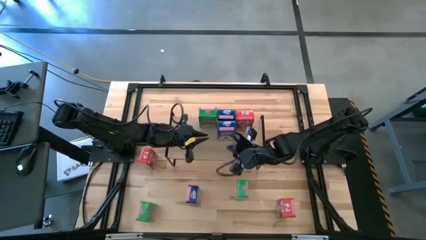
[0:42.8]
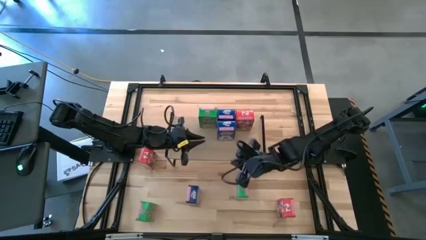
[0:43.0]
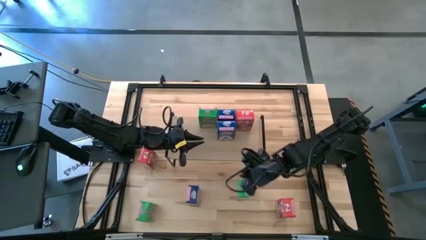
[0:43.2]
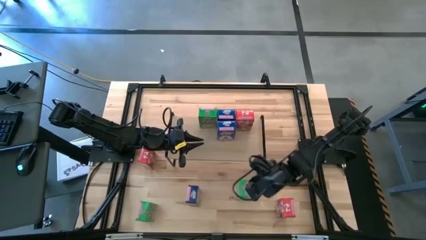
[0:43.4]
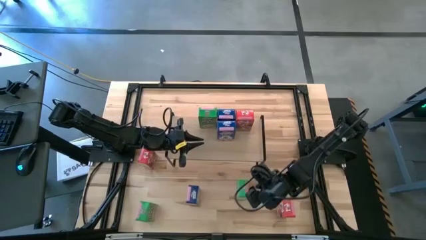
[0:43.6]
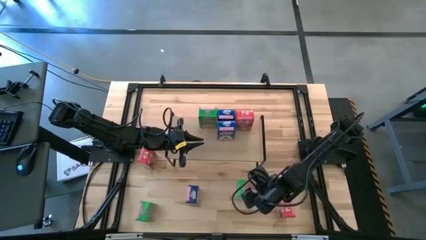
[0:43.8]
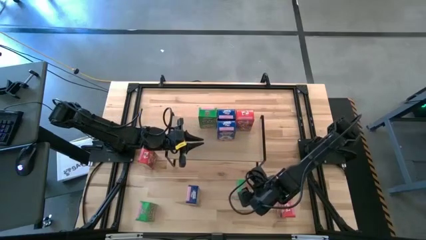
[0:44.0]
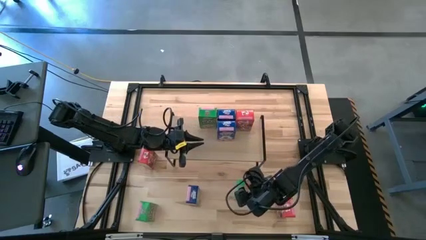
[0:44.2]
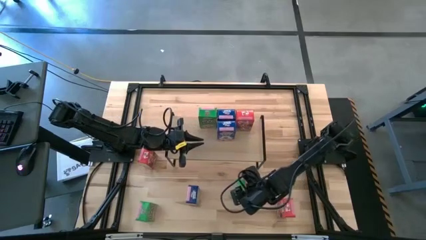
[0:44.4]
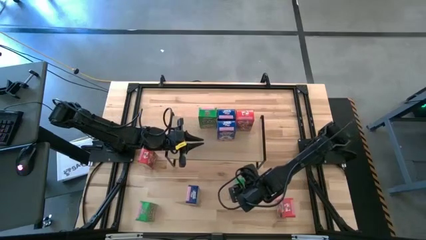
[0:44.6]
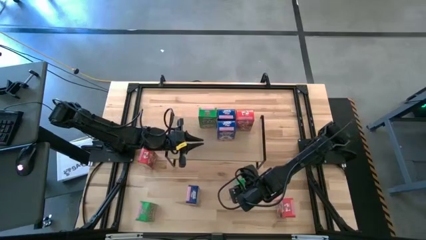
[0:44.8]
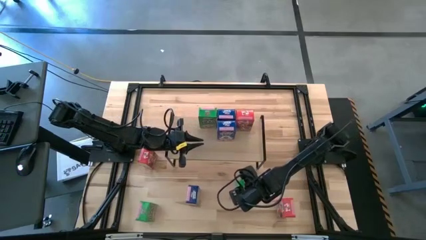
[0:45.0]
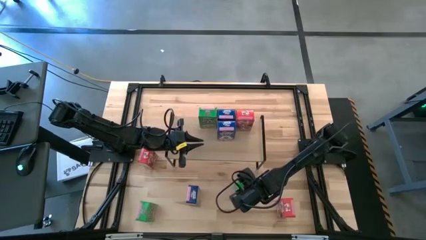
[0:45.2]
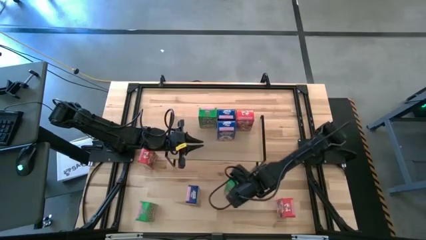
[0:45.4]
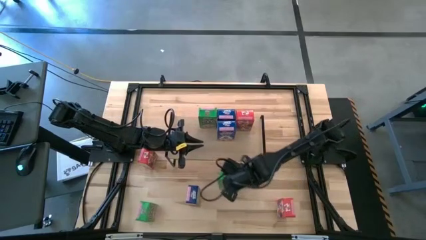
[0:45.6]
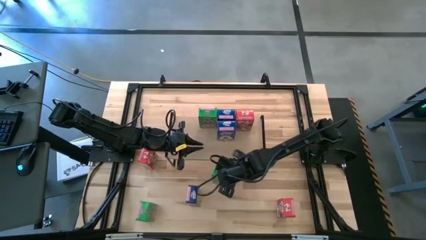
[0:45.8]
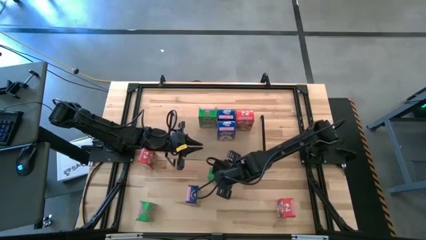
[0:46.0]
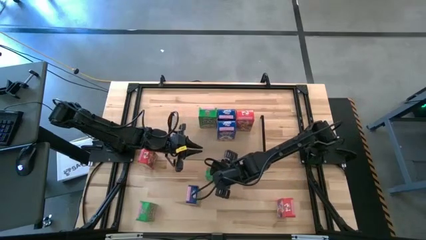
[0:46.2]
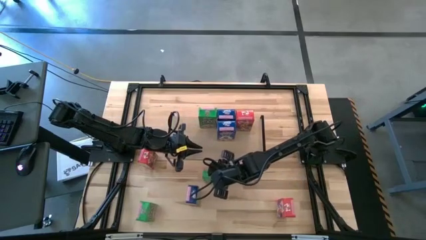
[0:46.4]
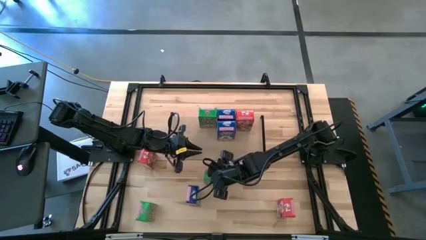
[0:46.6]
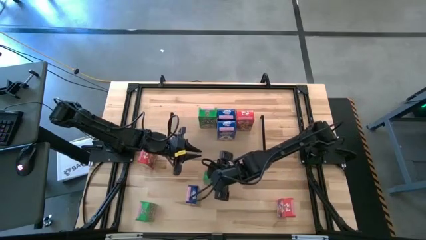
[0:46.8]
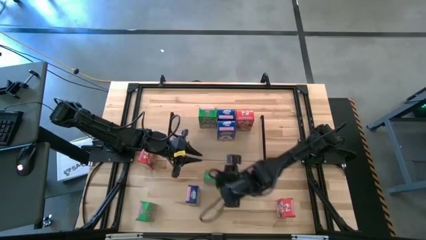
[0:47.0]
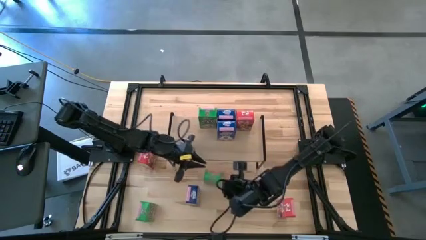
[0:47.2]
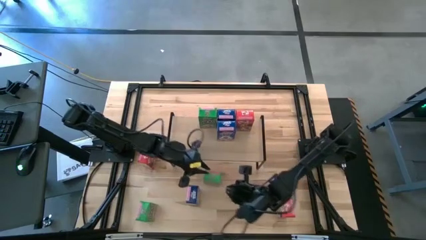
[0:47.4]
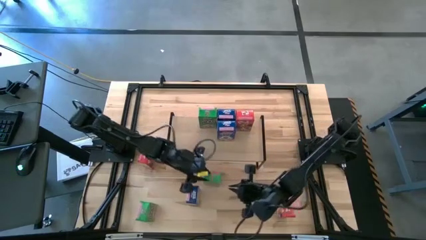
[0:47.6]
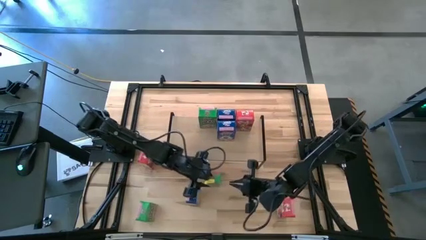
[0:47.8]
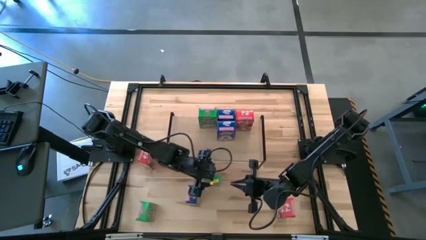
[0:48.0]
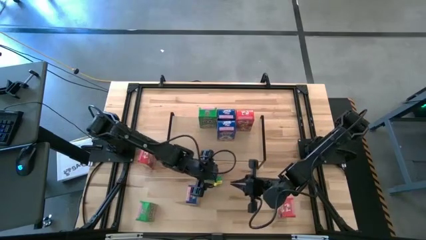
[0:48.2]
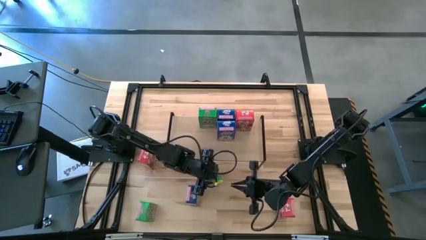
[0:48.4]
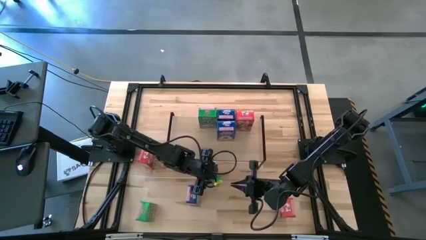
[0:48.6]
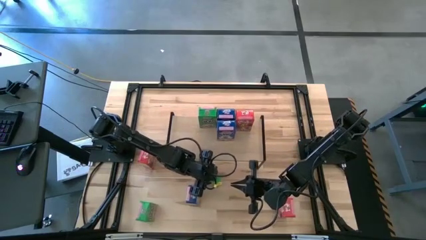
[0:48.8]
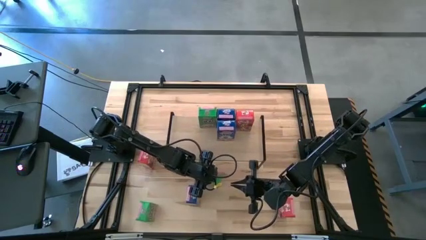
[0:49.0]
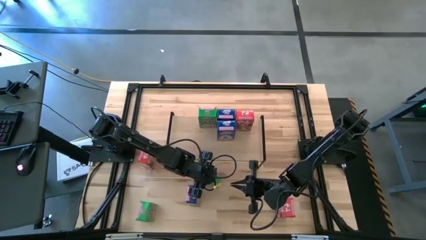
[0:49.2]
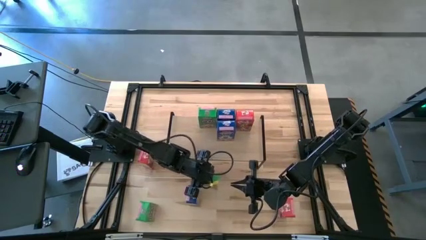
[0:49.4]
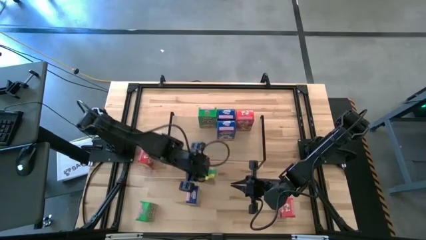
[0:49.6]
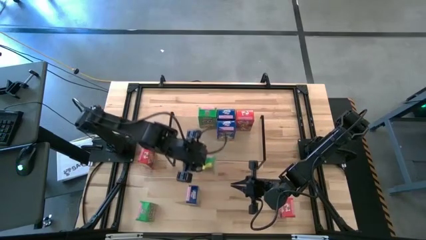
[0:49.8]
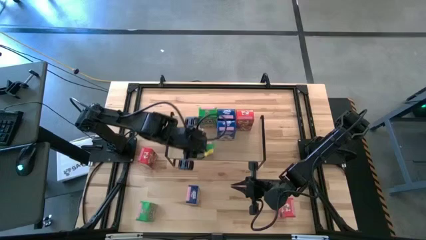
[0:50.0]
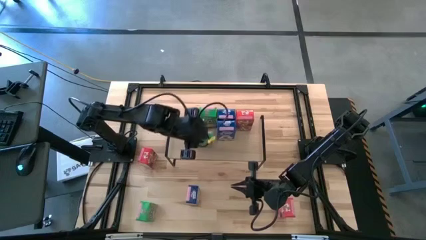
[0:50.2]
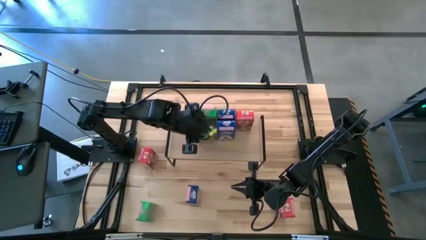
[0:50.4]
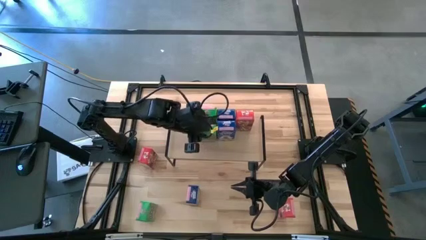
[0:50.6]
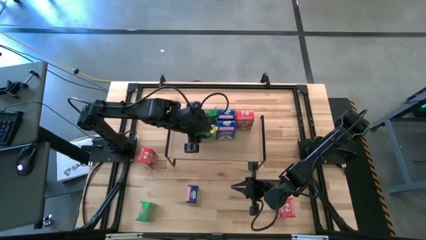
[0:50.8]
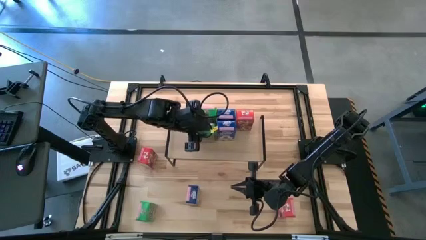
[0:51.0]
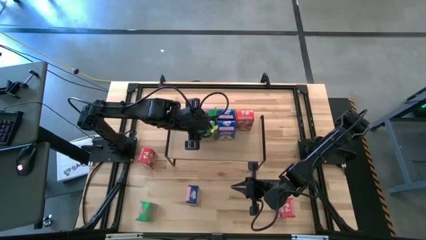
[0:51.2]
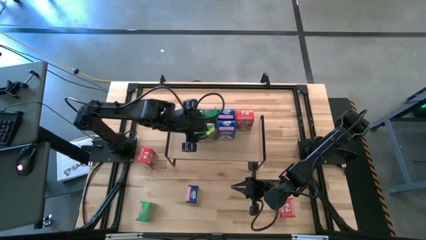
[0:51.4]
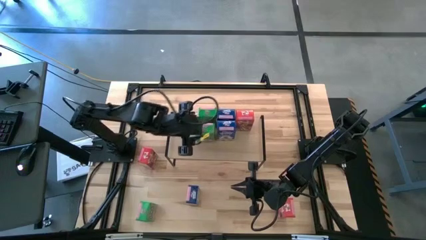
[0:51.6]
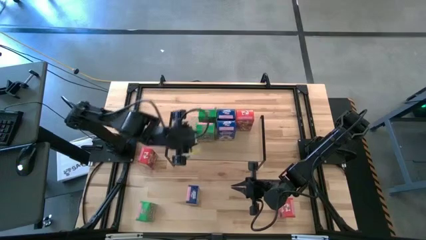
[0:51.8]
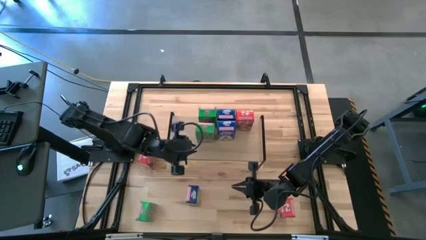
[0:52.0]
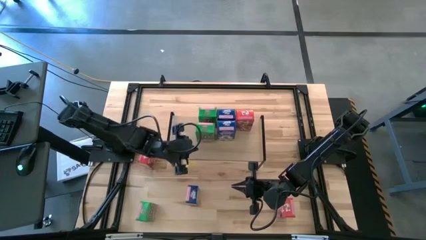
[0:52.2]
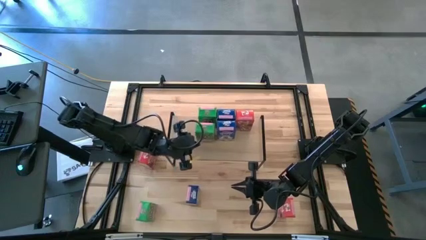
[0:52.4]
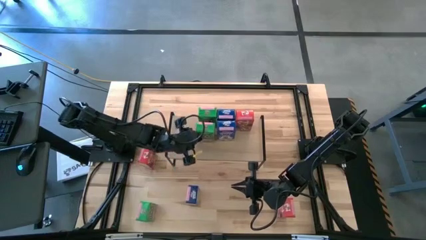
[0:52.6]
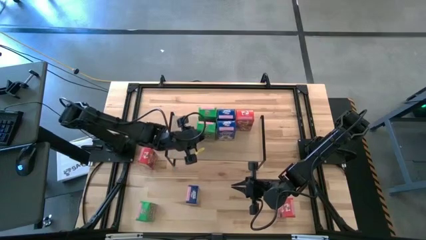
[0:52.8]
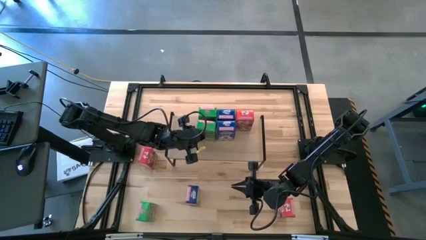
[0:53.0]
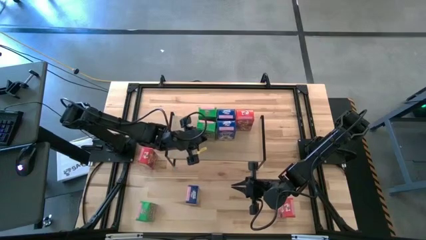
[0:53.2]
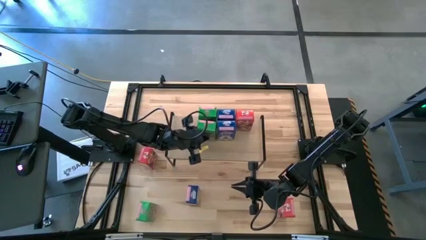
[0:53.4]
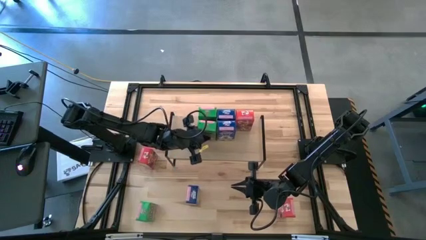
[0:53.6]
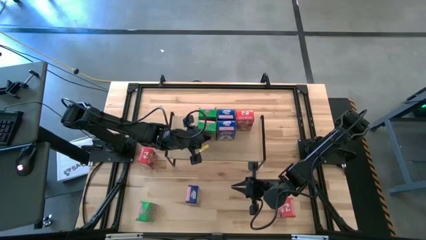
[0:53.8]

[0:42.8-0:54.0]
Task: Stack cereal on shelf
Put the top green cereal box on the shelf aligned with the other green cereal box

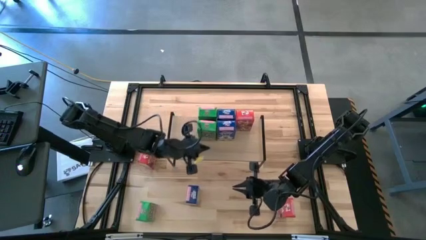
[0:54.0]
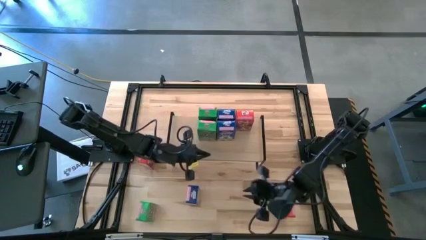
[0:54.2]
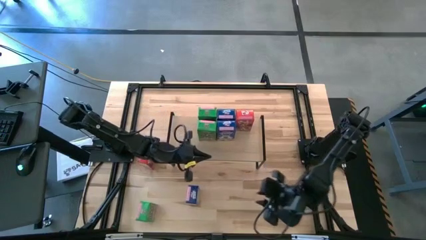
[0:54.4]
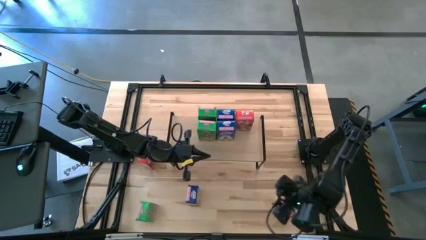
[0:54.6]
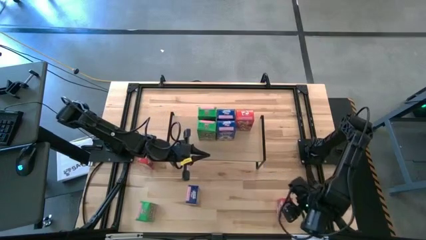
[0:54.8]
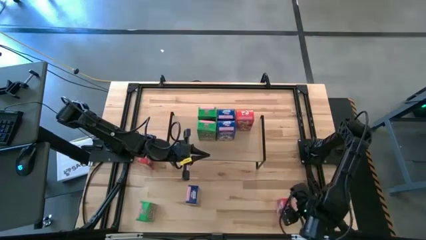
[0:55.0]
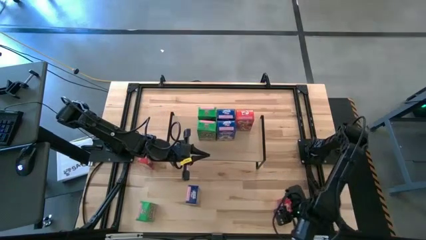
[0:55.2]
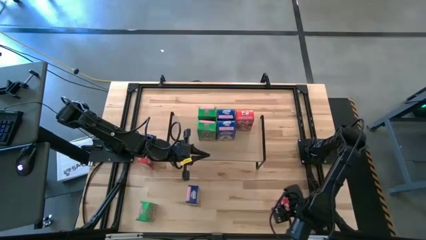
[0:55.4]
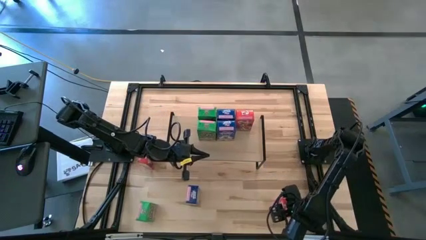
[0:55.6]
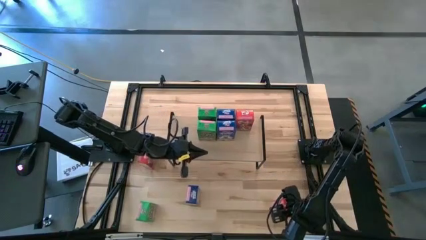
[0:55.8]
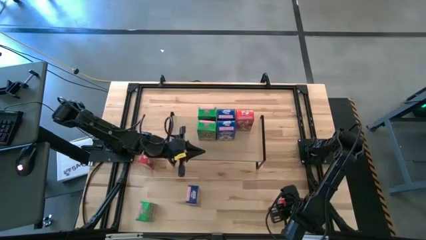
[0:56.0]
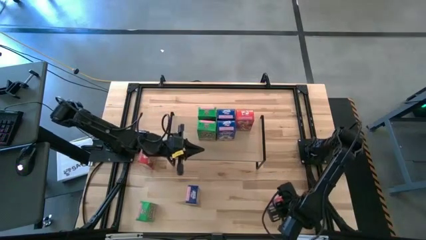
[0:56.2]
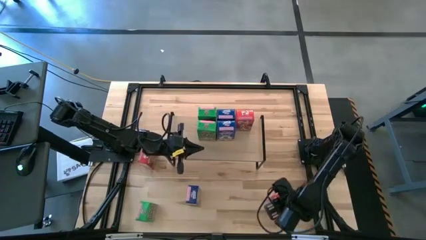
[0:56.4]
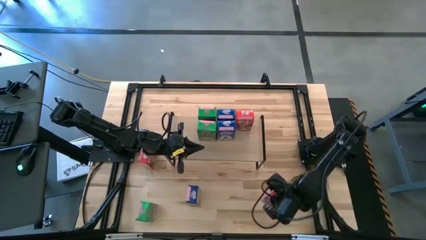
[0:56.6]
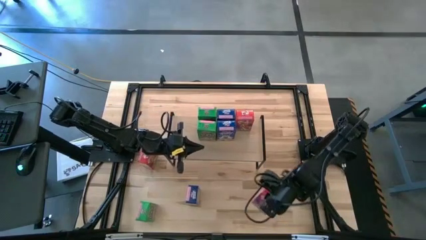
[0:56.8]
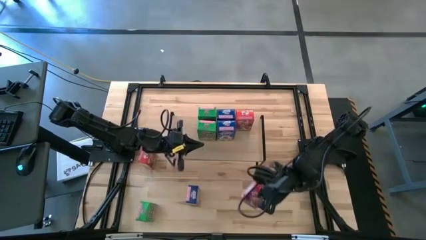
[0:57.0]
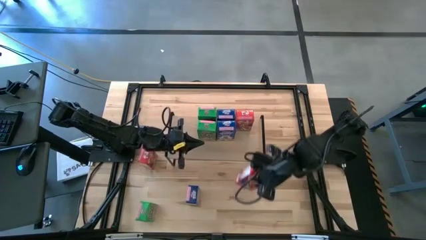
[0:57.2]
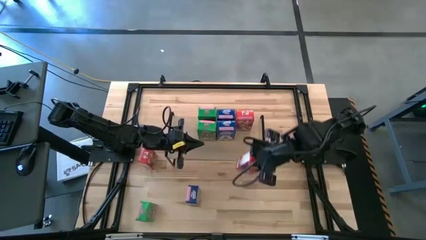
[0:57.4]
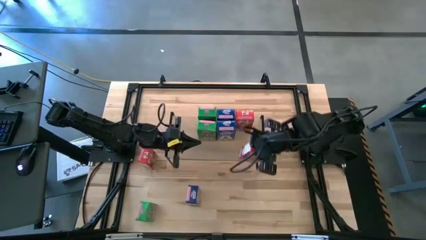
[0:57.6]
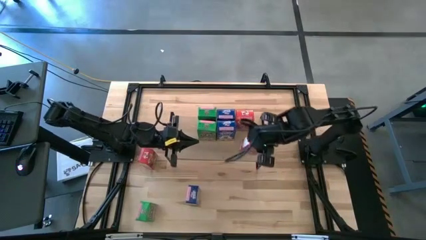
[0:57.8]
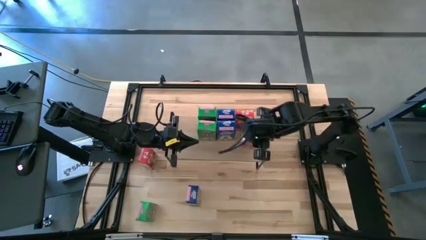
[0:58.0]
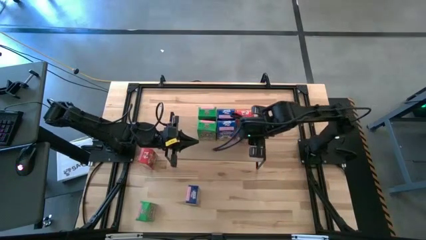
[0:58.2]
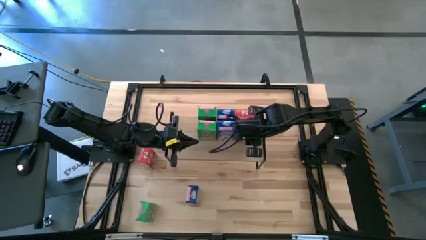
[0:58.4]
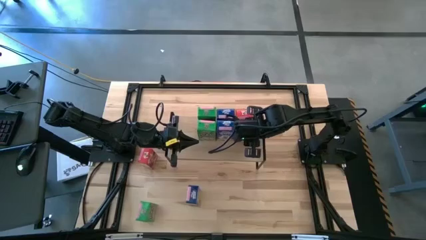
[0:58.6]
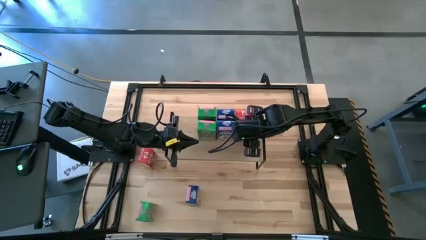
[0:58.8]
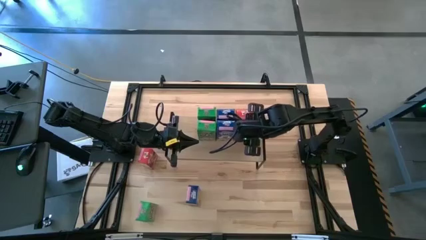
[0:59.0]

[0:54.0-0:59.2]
Put the bottom red cereal box on the shelf aligned with the other red cereal box
